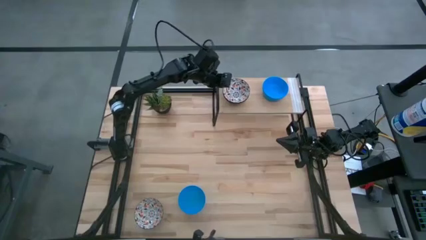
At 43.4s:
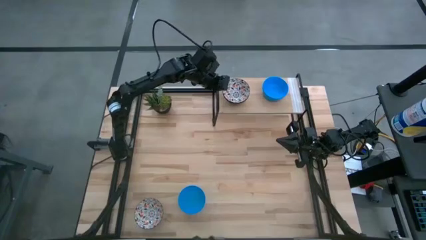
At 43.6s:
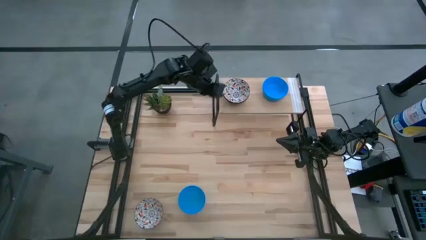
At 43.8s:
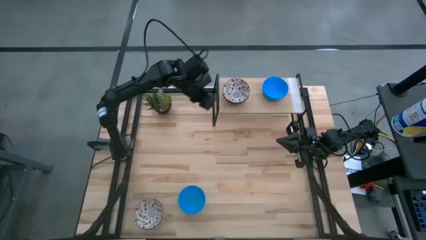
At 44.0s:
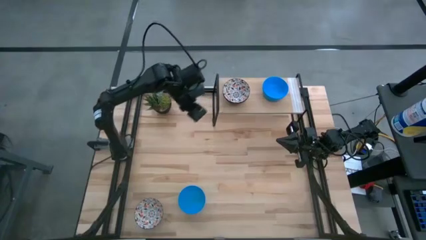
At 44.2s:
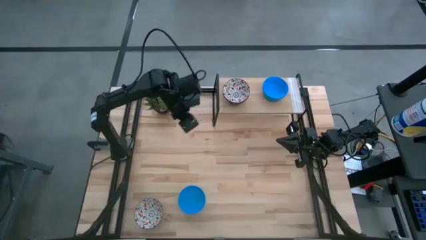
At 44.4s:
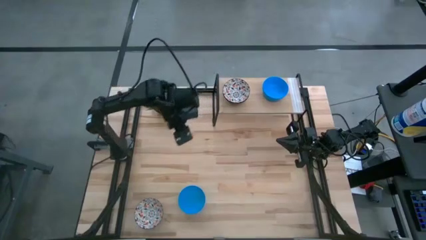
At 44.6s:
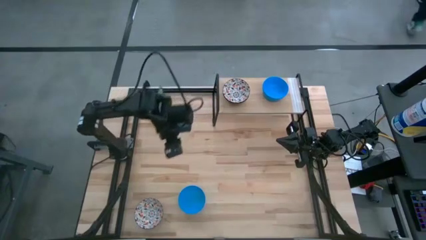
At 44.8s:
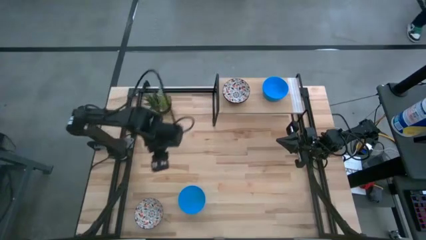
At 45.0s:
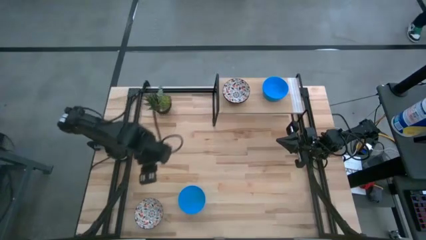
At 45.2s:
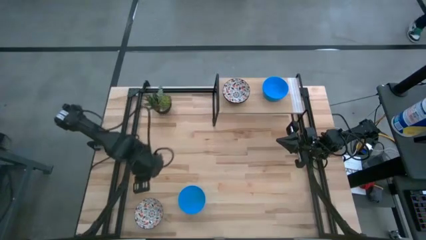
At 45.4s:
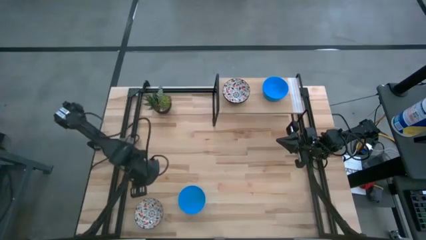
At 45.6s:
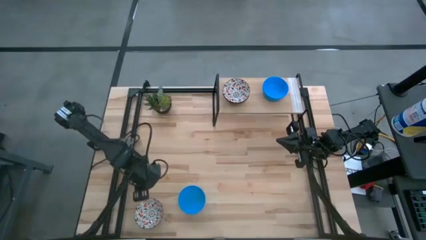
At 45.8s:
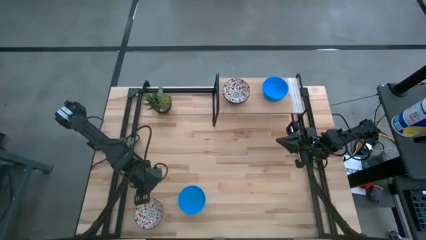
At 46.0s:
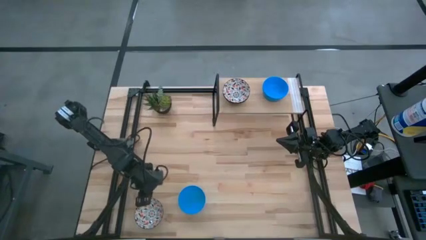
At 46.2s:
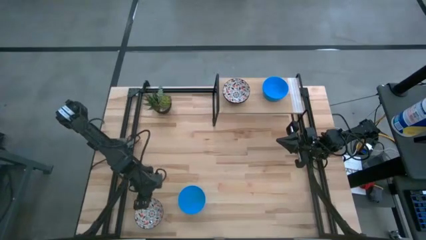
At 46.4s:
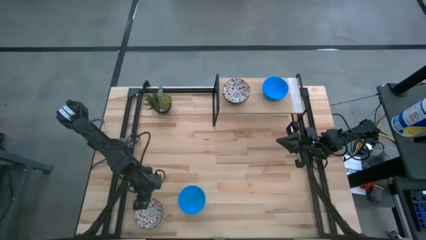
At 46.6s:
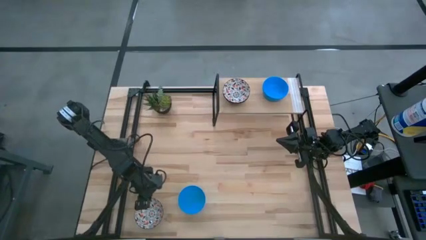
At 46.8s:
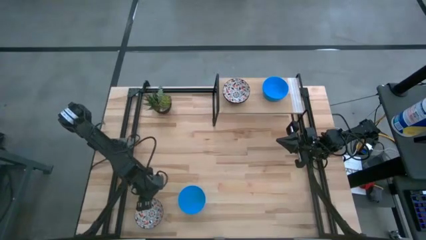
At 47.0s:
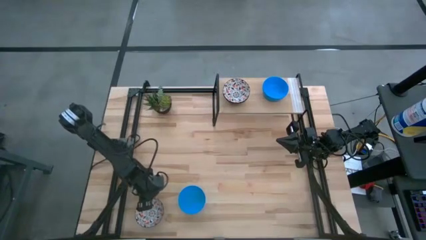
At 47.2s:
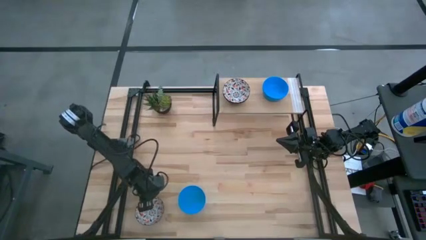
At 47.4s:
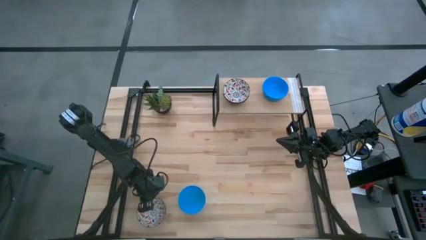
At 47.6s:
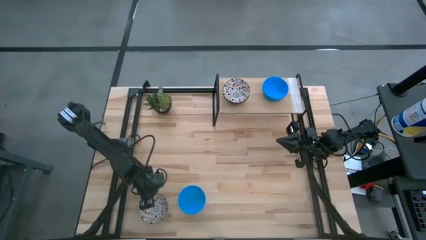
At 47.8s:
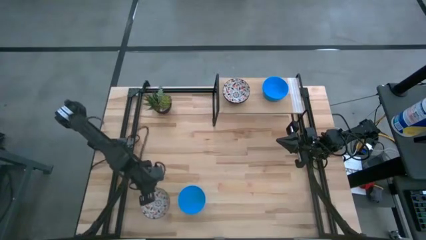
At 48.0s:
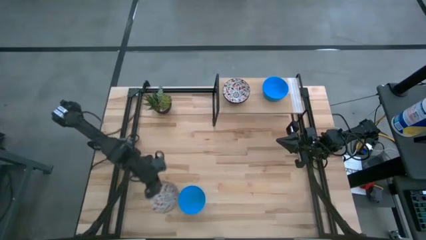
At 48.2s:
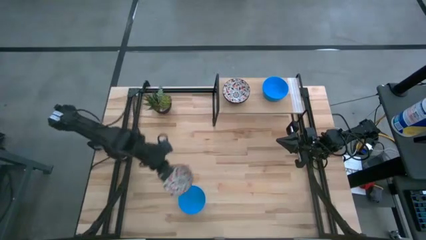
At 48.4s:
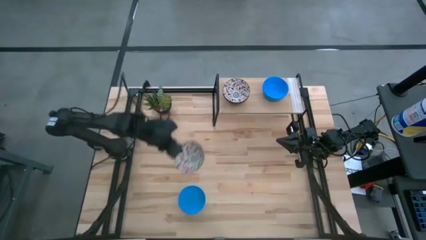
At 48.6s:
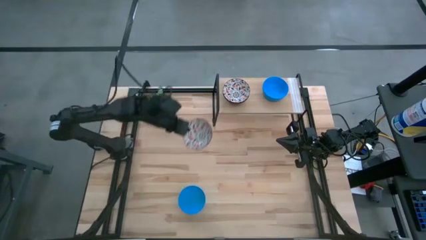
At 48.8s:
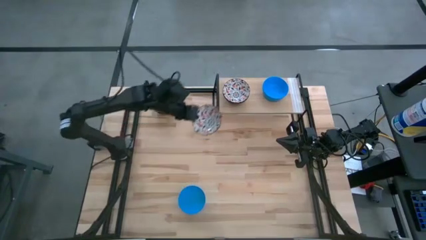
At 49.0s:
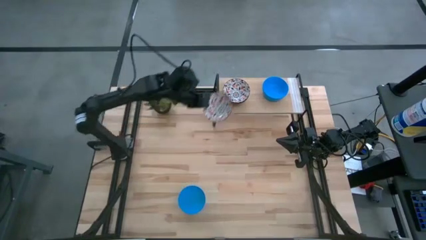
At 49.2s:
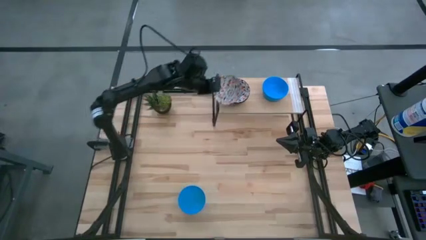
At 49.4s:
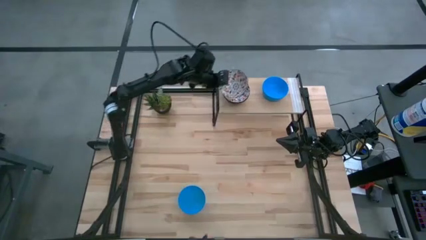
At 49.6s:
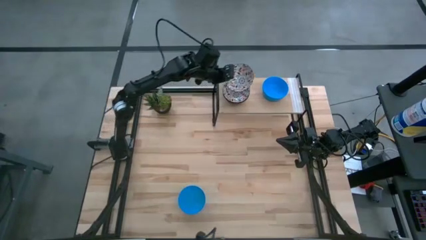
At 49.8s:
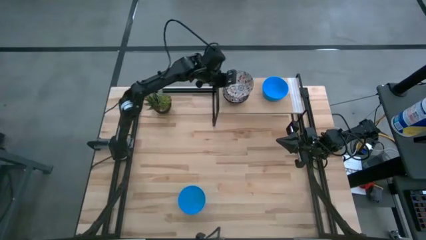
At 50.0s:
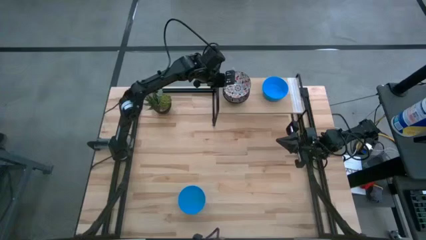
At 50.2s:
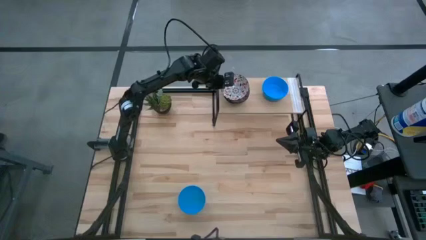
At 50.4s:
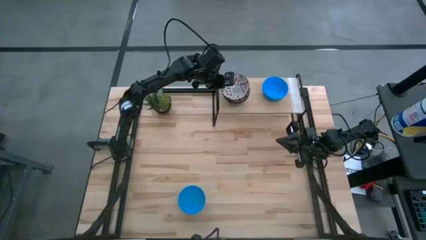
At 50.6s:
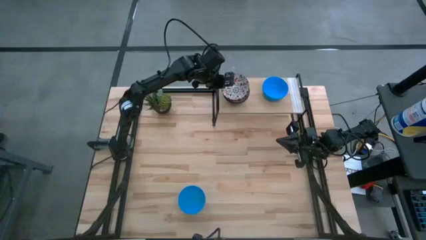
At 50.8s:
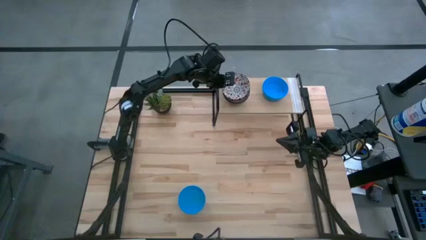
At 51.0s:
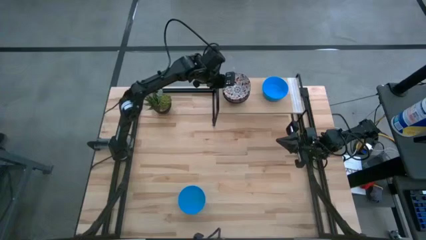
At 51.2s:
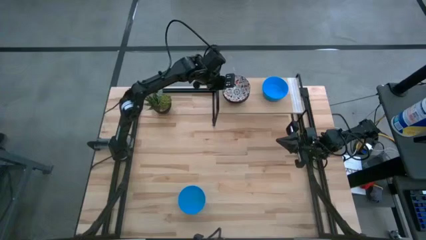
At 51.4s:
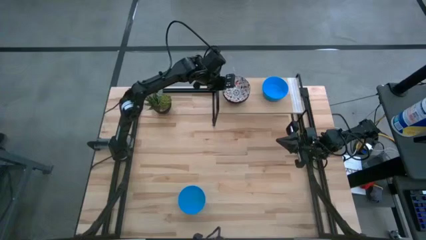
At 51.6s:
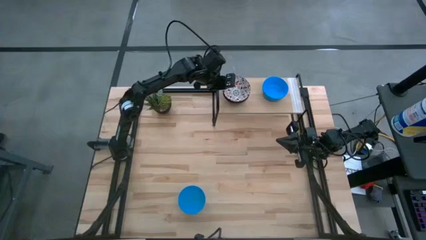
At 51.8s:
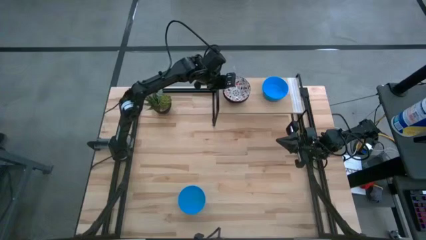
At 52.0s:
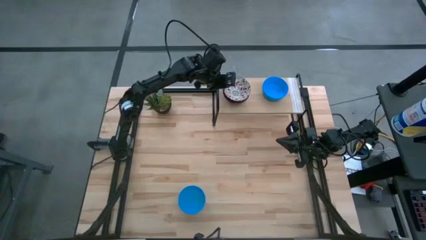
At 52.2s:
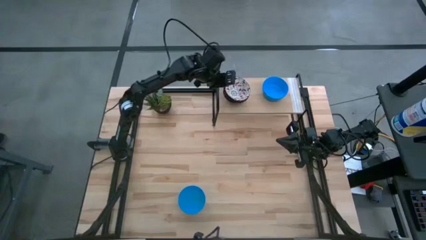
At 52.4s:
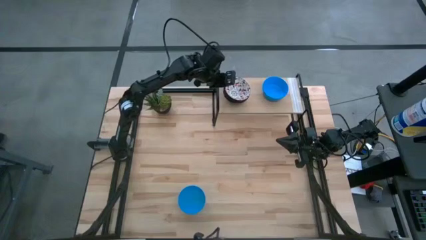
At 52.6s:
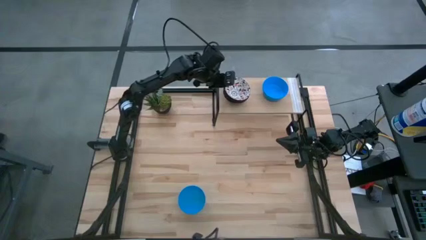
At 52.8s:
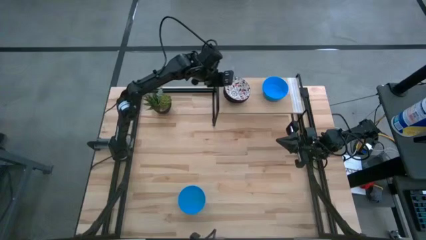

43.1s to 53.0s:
Task: Pick & Place Mini bowls
Stack the white patterned bowl on the white patterned bowl on the shelf

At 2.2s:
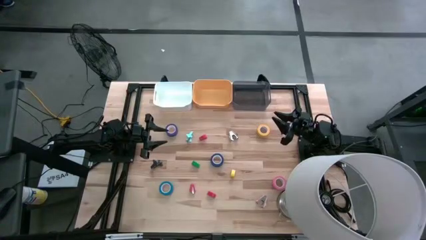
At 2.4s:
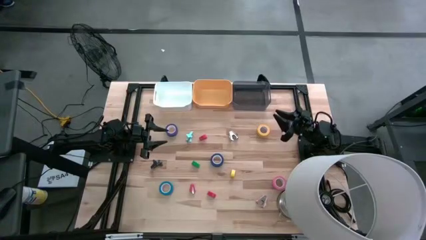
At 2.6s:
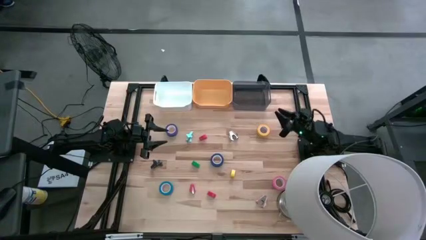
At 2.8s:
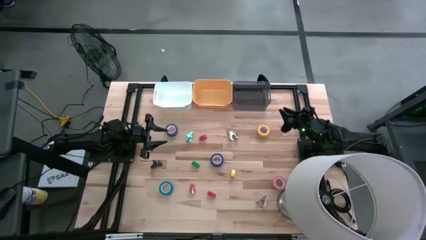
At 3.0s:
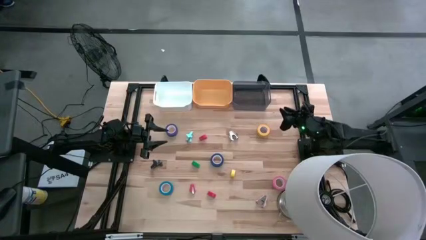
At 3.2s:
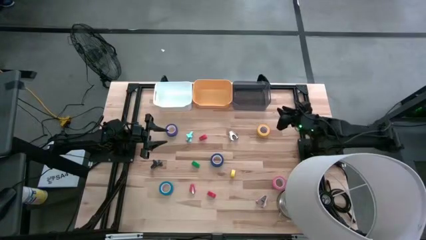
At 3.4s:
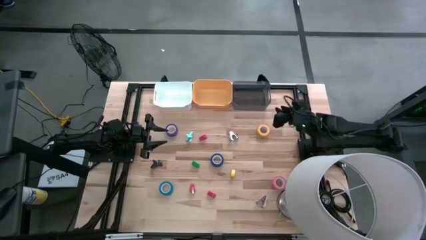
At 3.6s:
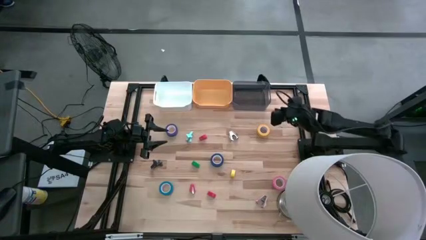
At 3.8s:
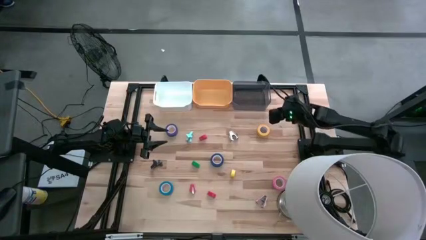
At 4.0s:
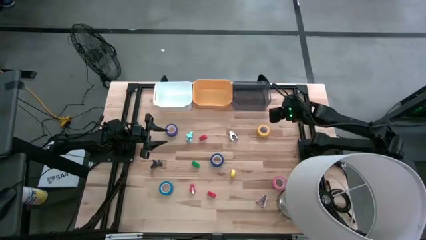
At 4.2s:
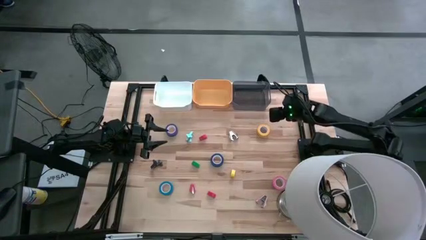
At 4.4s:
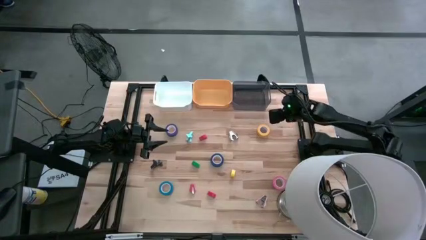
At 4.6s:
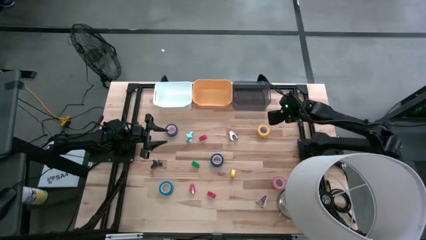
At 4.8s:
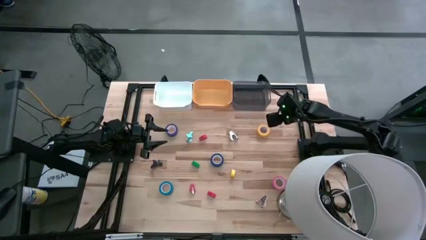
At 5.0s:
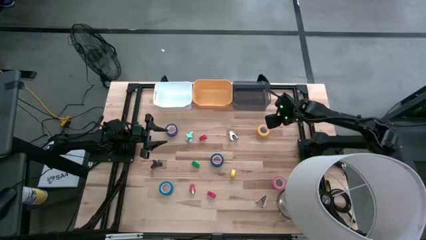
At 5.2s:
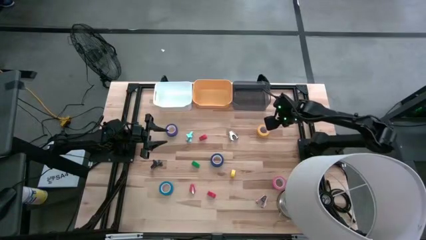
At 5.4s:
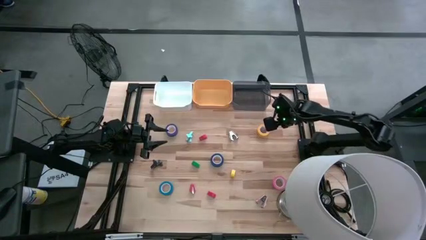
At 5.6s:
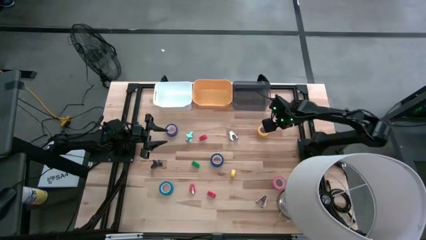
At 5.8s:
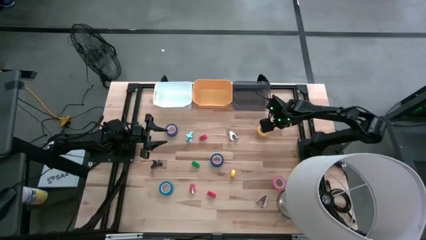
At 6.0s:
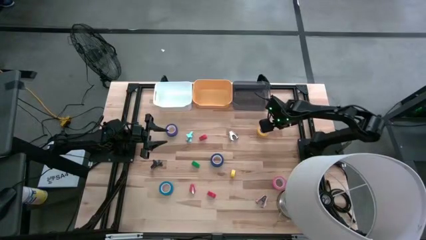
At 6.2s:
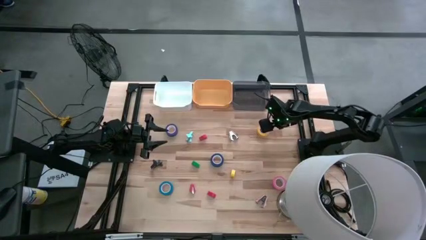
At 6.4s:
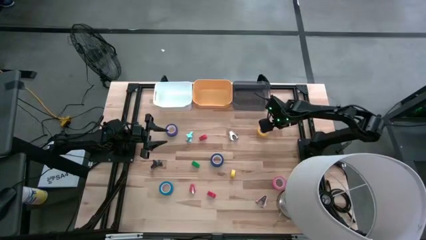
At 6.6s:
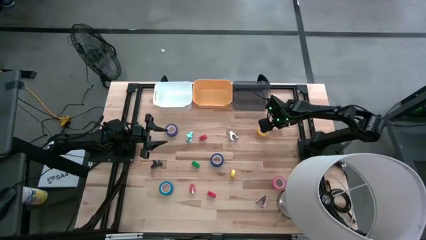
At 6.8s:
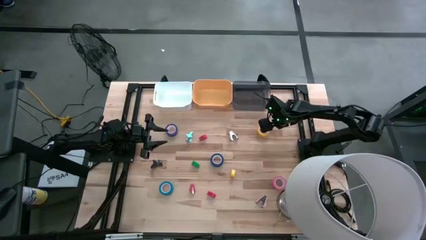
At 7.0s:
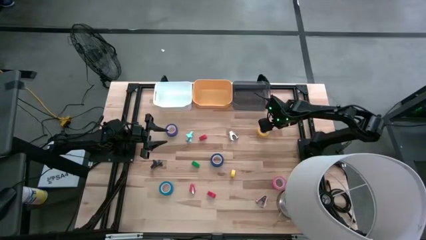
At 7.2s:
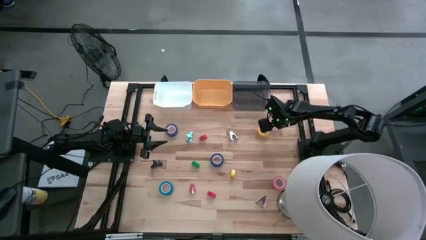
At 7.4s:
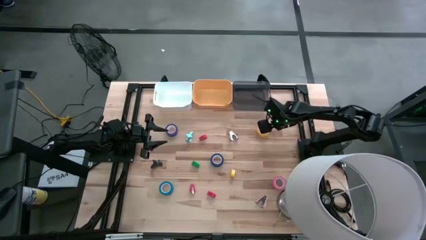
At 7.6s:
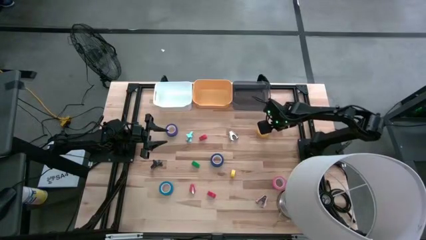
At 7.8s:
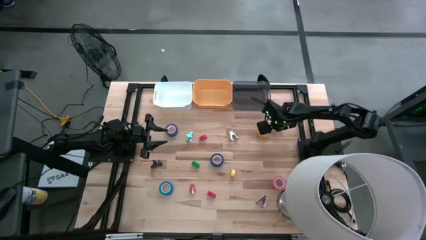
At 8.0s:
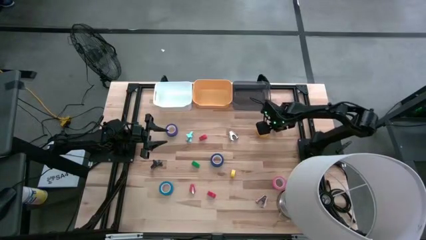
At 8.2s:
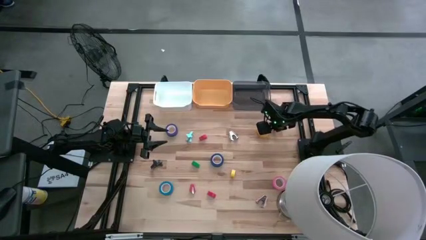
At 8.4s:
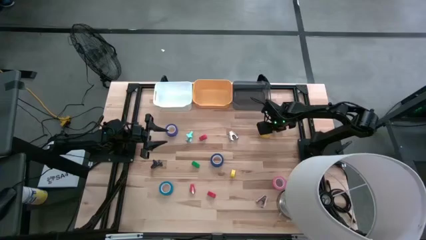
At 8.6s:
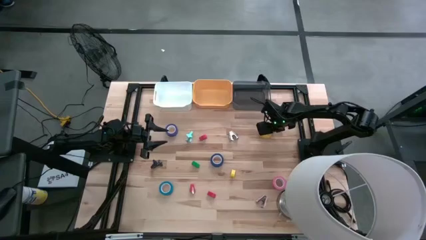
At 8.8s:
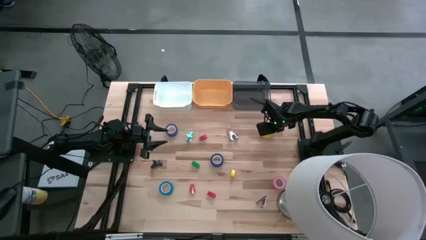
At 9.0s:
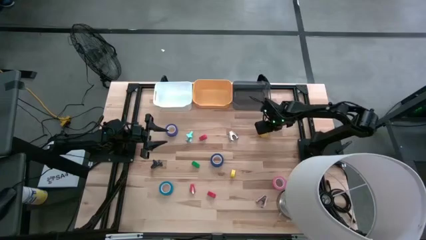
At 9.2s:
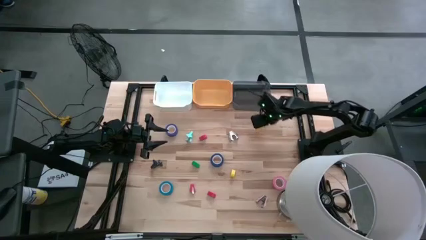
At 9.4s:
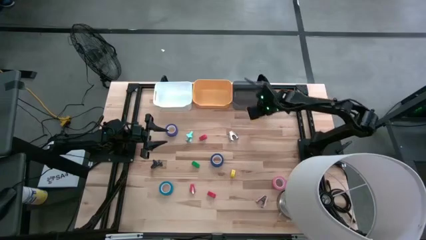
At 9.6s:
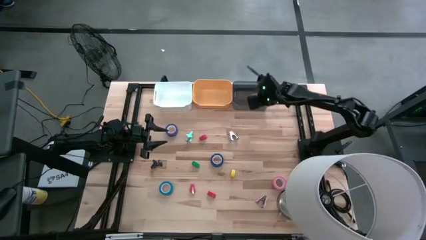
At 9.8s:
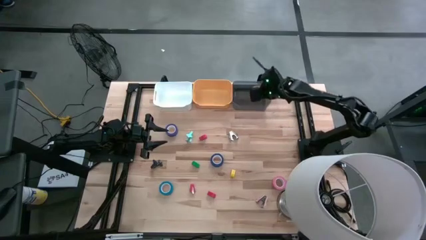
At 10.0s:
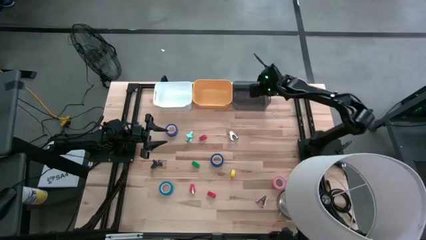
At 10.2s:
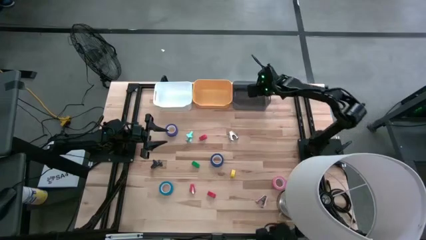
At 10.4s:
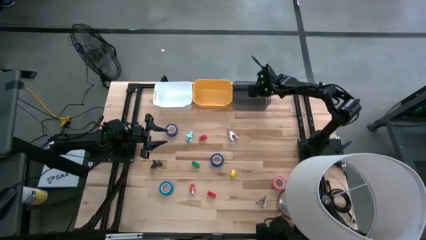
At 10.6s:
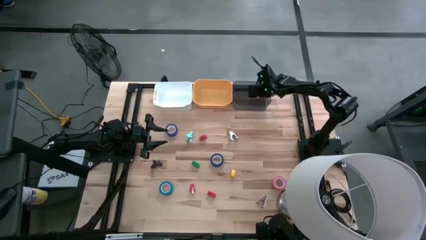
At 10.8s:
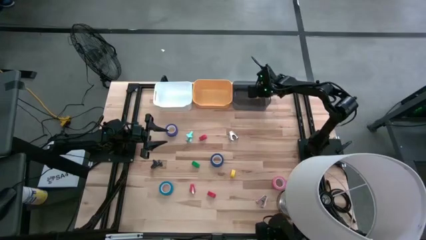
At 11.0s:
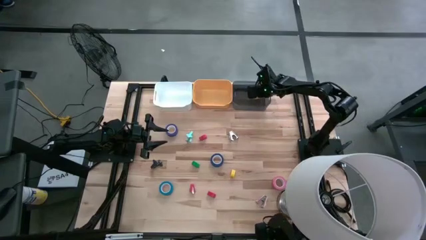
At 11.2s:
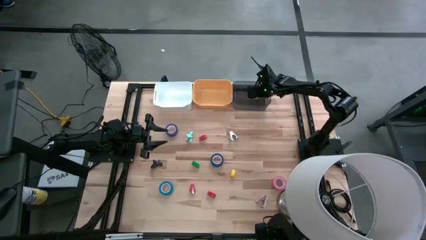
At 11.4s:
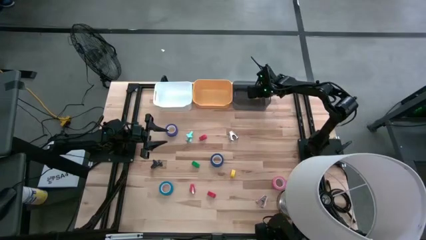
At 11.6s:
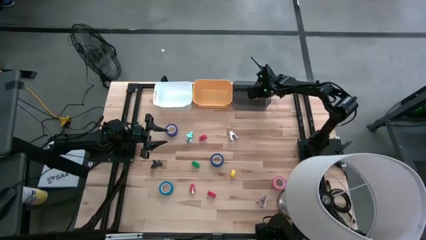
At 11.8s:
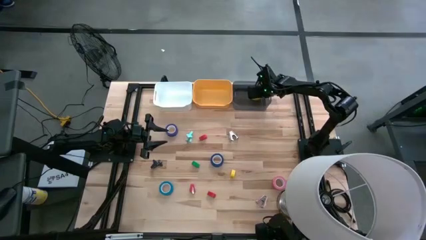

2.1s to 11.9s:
Task: Pick and place Stapler, Stapler remover, tape
Put the yellow tape into the gray bin
